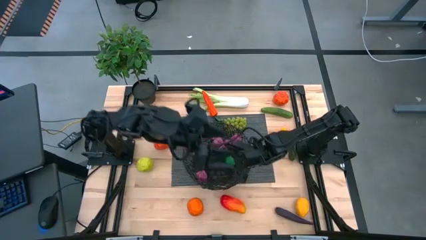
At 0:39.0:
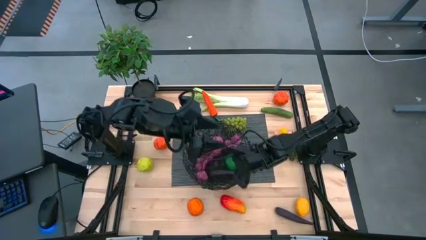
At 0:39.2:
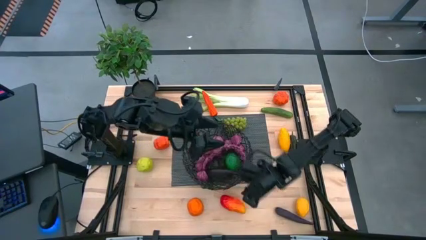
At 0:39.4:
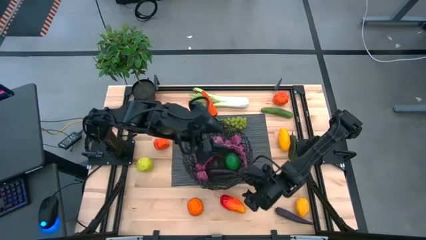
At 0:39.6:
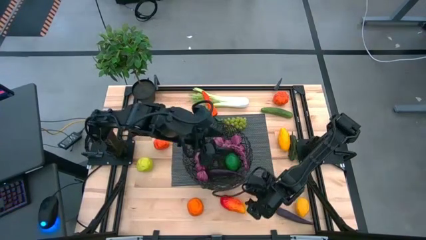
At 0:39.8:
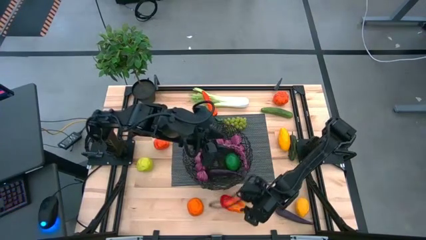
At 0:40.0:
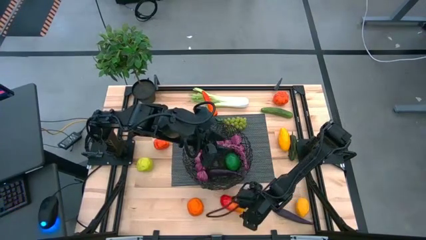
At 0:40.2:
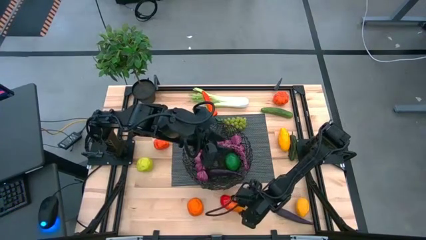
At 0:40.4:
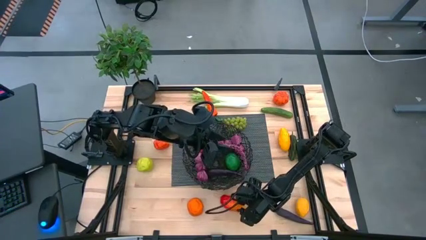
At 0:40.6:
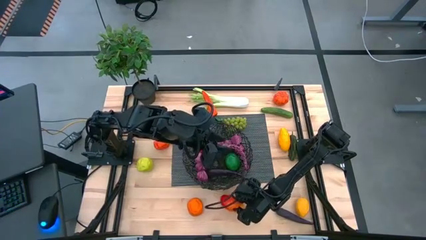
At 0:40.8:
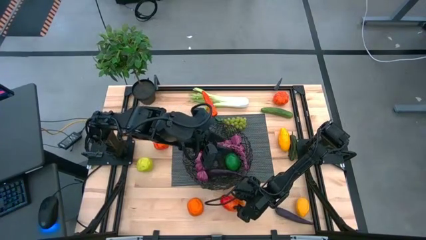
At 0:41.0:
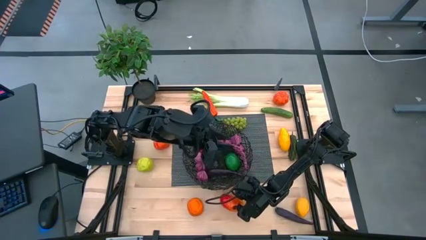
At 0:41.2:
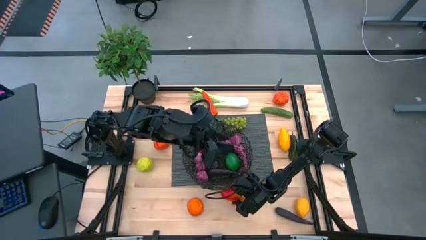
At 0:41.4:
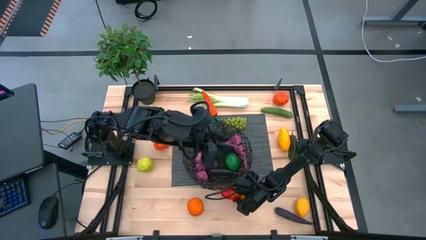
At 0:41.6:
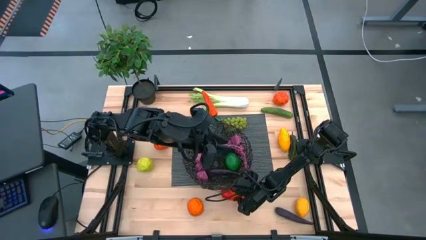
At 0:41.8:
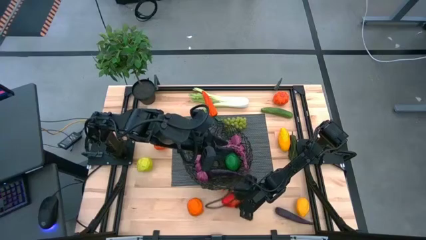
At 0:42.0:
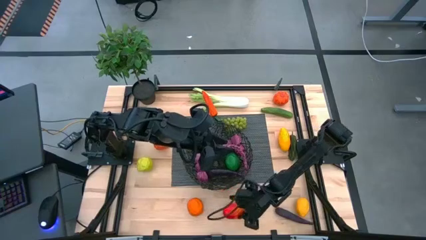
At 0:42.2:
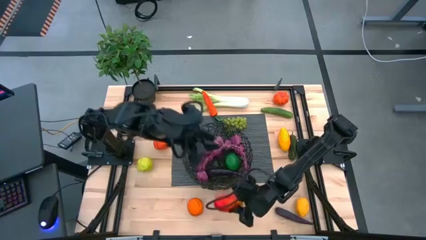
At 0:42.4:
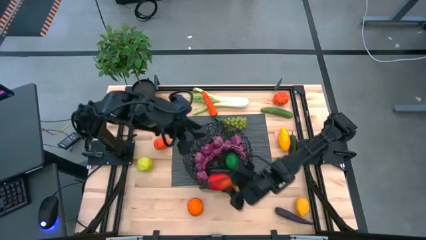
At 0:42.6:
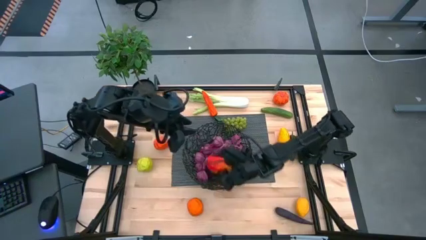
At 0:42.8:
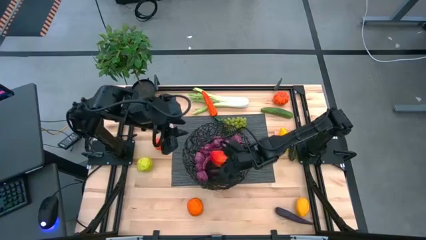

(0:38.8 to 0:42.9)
Task: Build produce basket
Put the red mango into the black wire basket

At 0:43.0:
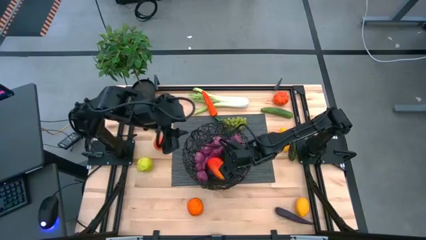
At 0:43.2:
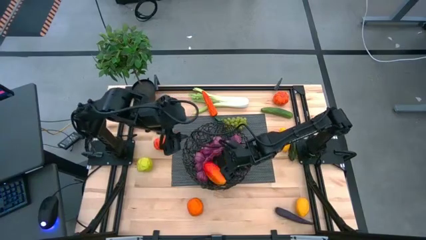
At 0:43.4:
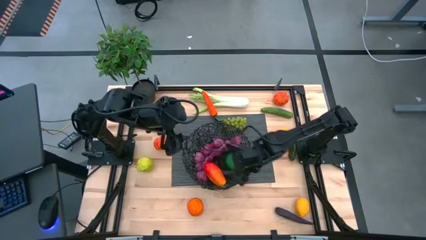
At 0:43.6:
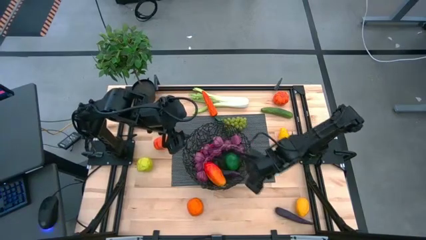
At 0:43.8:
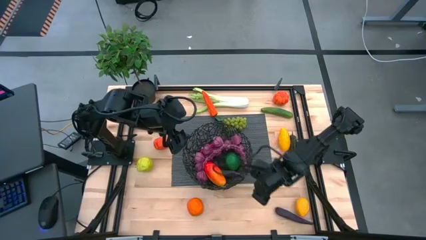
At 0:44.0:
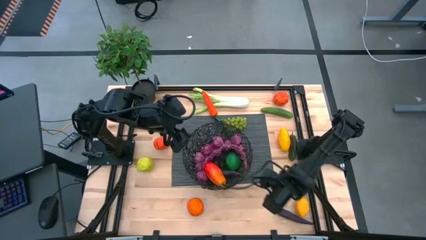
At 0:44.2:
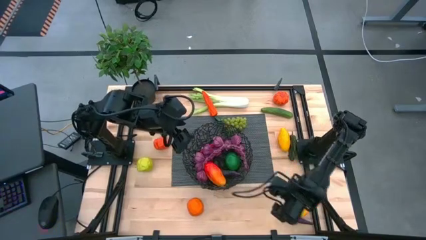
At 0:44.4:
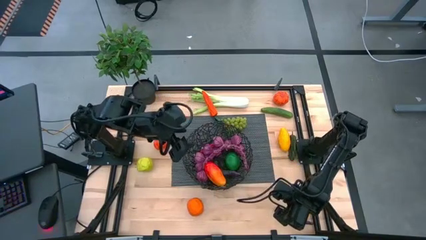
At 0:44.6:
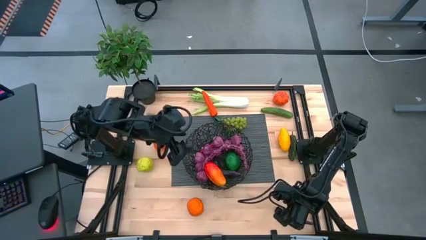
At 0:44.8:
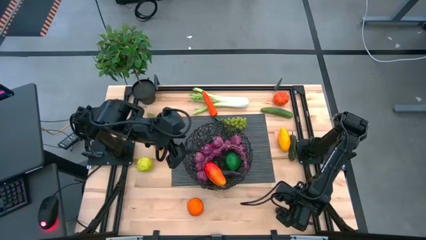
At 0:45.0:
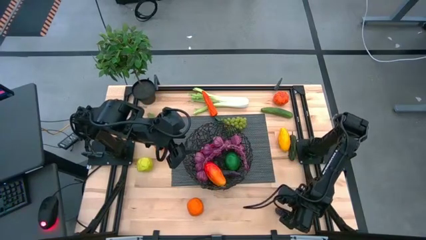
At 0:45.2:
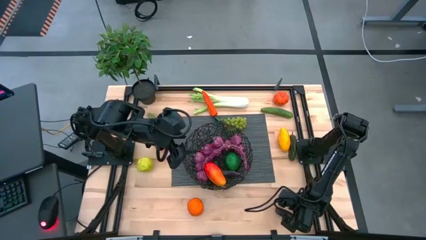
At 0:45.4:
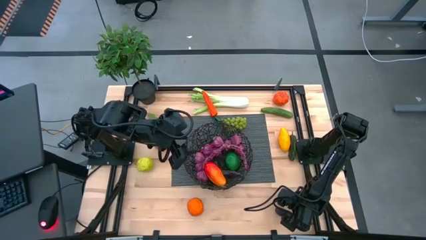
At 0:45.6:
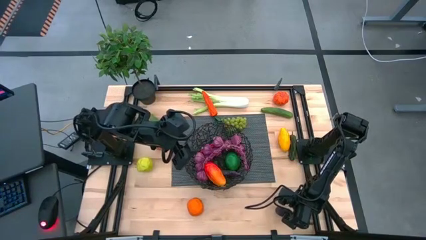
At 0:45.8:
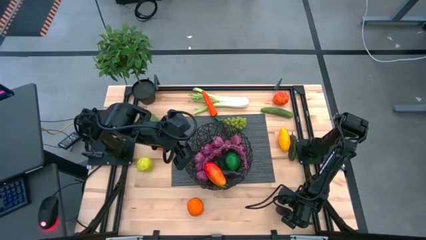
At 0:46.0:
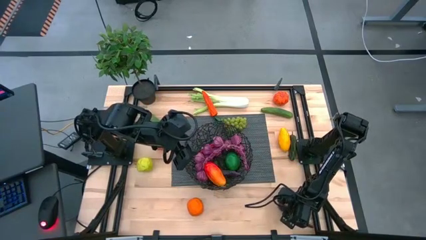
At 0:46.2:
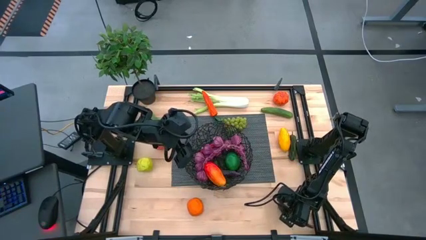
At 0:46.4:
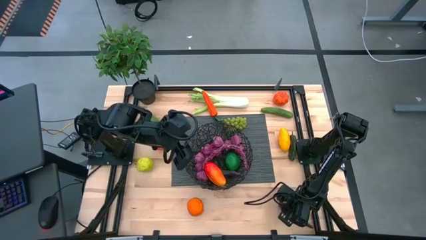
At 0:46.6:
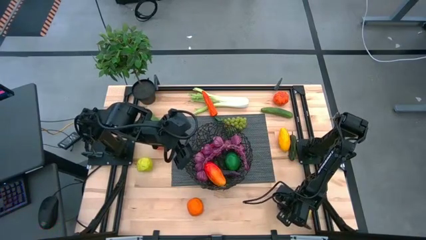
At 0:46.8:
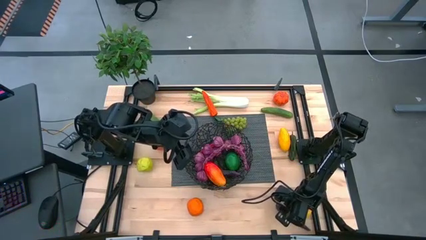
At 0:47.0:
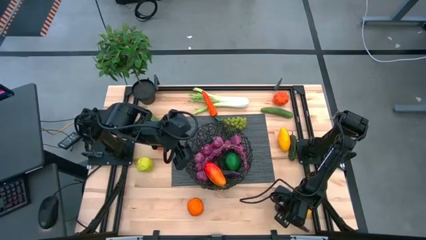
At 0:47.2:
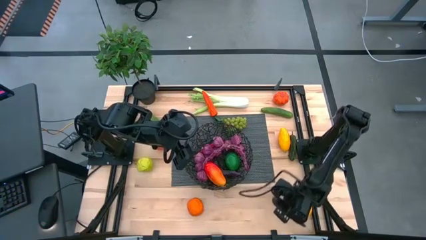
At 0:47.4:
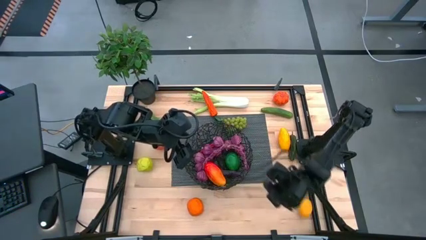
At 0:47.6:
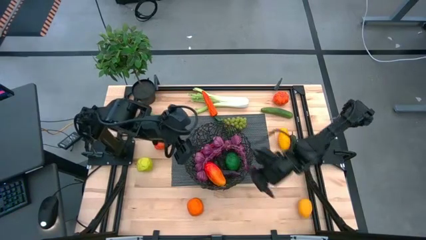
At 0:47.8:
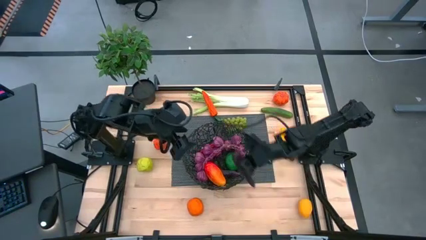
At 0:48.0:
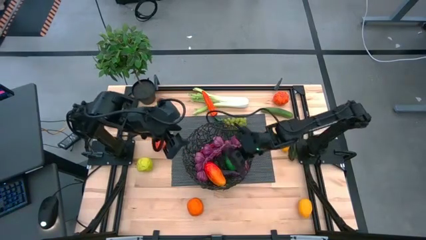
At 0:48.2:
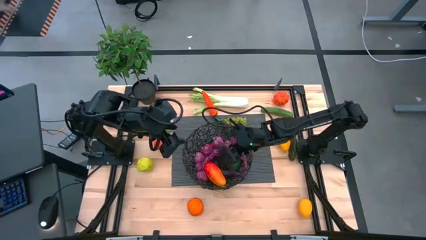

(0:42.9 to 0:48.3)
Put the purple eggplant into the black wire basket

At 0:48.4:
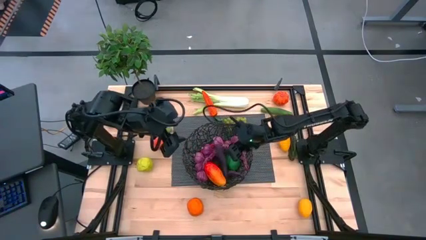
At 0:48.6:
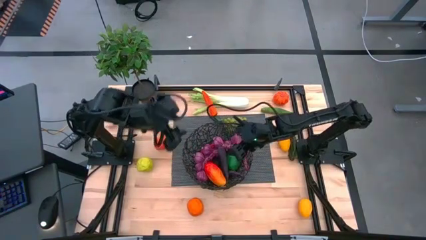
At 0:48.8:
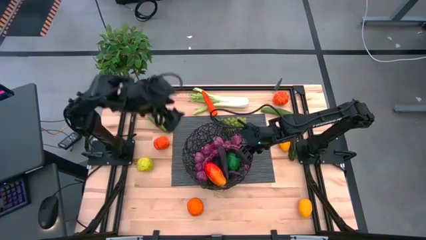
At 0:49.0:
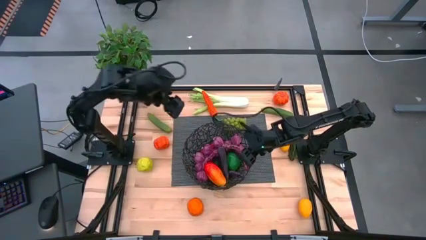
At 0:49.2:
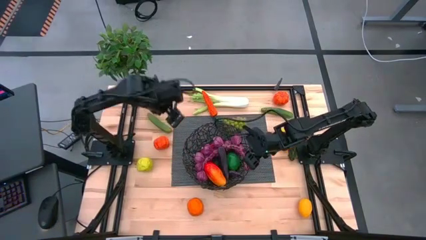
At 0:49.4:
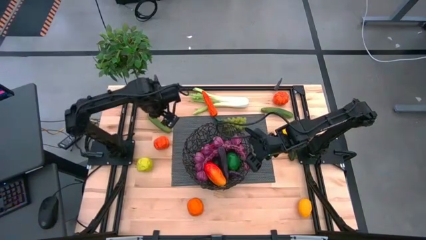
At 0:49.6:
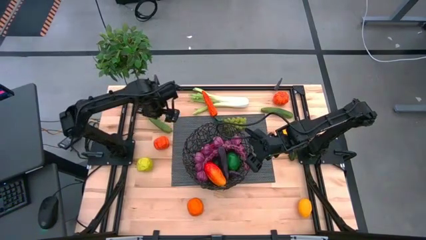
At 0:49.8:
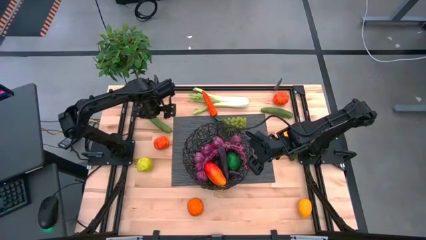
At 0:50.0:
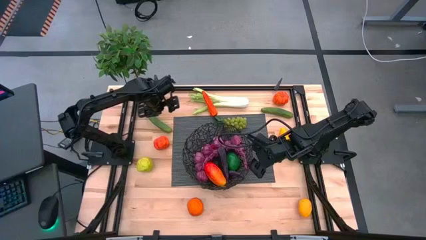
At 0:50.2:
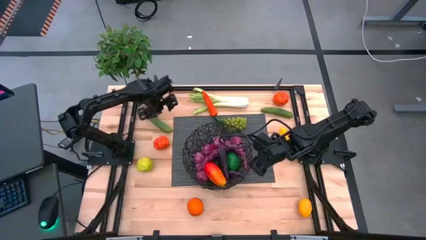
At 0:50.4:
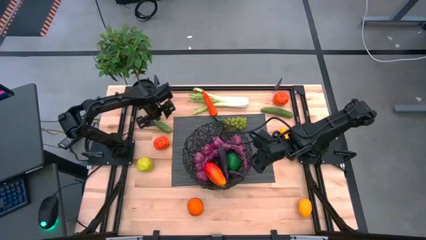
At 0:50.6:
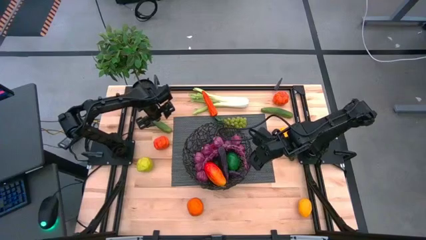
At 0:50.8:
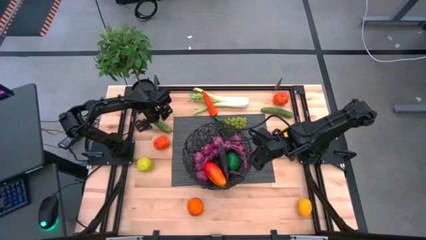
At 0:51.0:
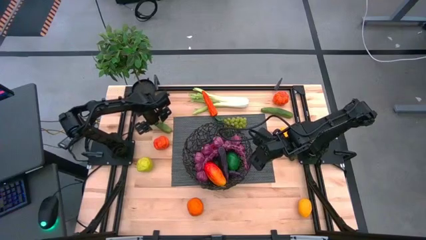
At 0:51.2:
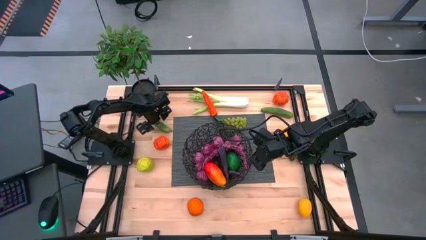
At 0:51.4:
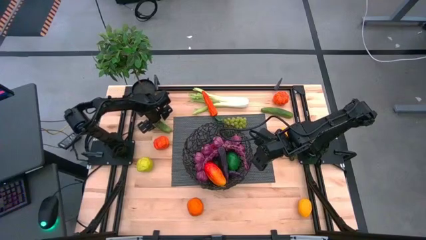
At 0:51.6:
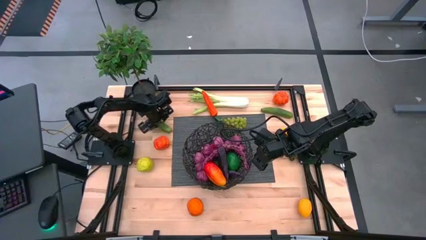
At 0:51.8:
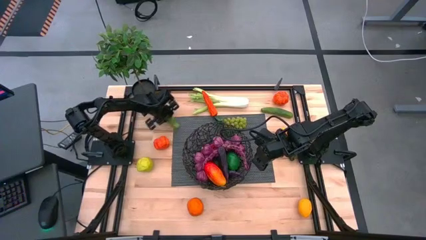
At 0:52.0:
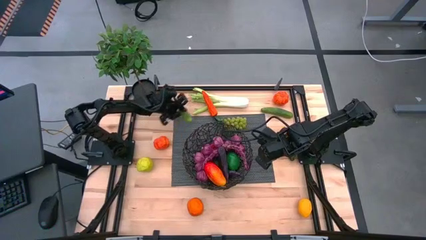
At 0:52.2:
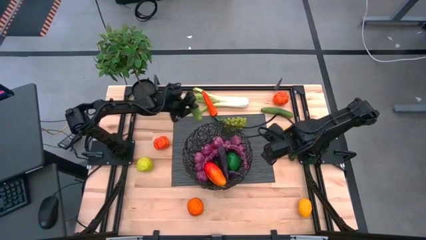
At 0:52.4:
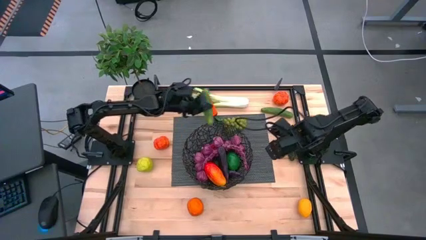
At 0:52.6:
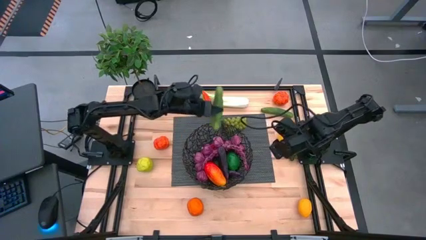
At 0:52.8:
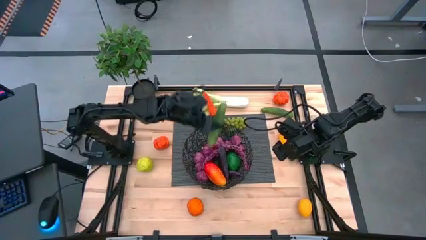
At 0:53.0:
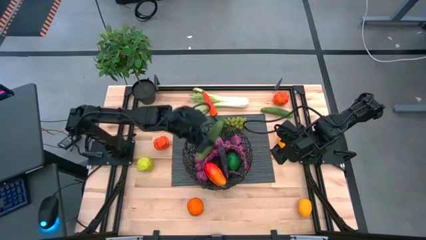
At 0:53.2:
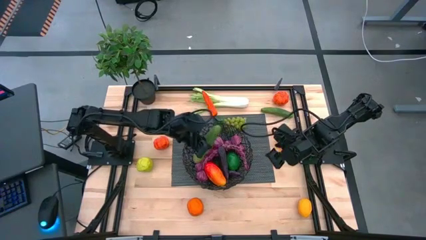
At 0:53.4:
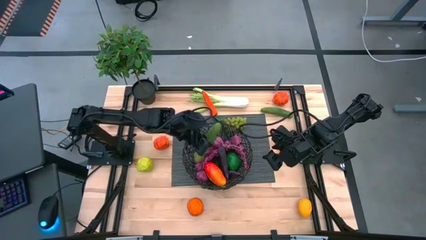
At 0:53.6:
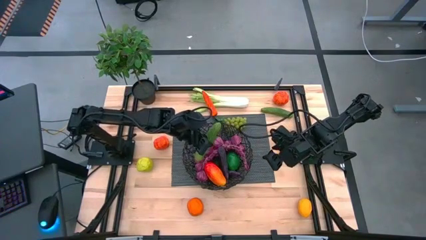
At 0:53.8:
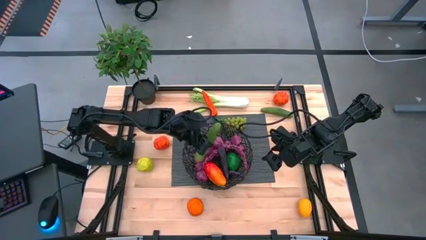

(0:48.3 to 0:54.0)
Put the left green cucumber into the black wire basket
